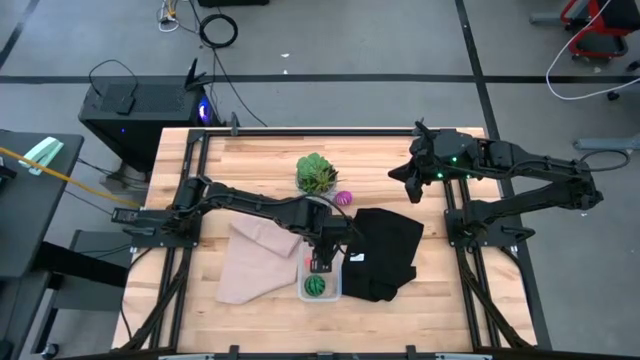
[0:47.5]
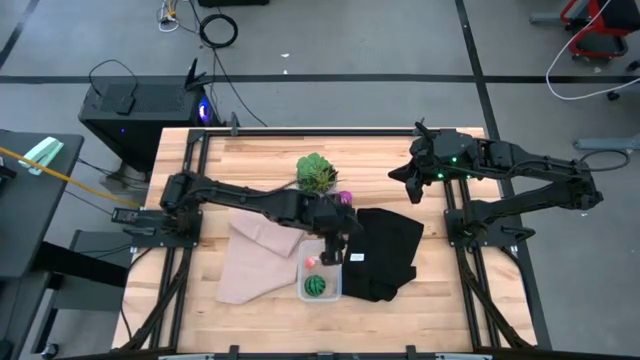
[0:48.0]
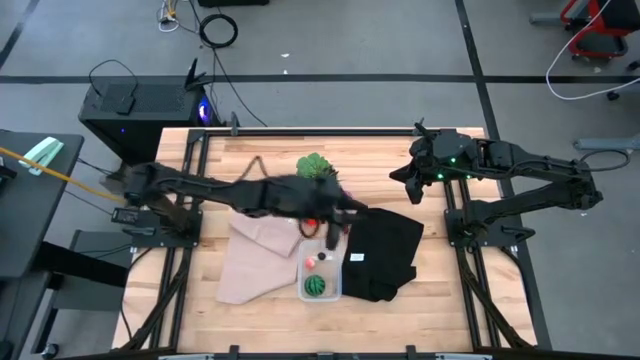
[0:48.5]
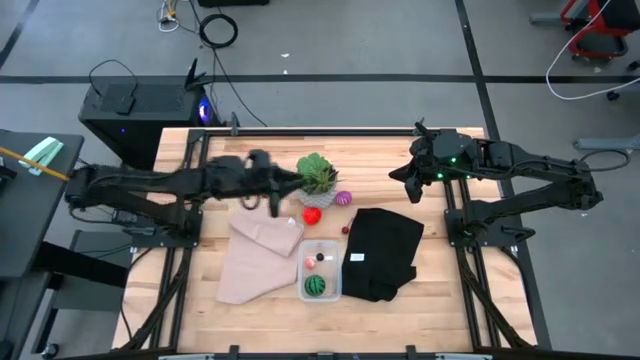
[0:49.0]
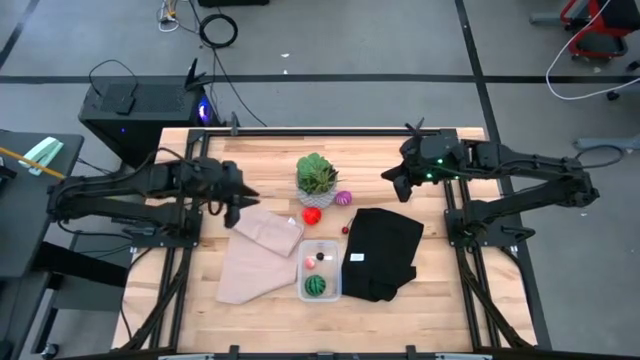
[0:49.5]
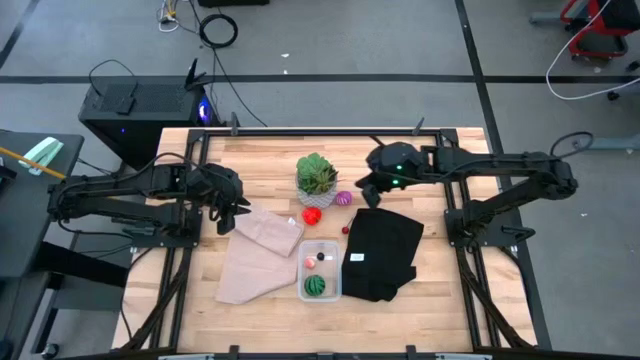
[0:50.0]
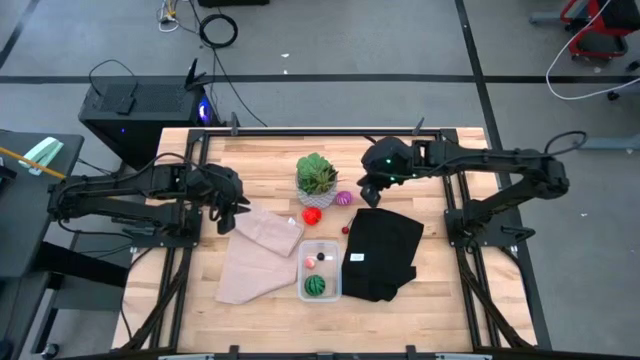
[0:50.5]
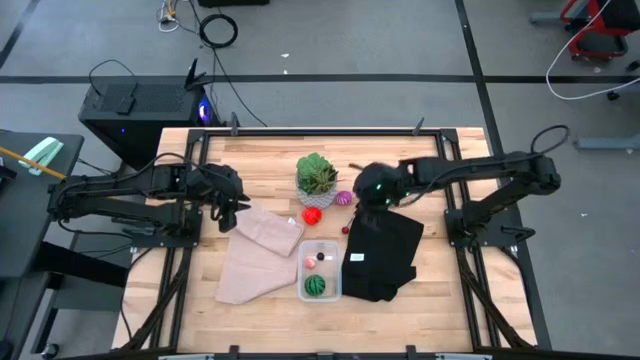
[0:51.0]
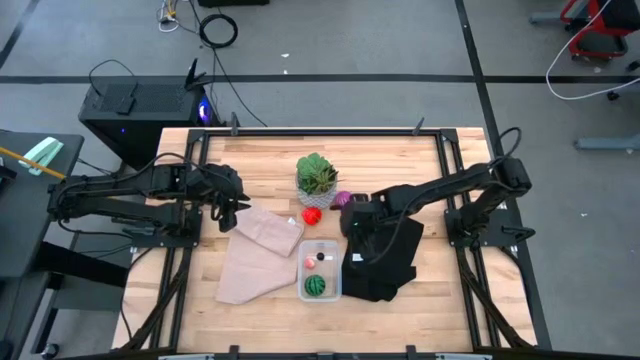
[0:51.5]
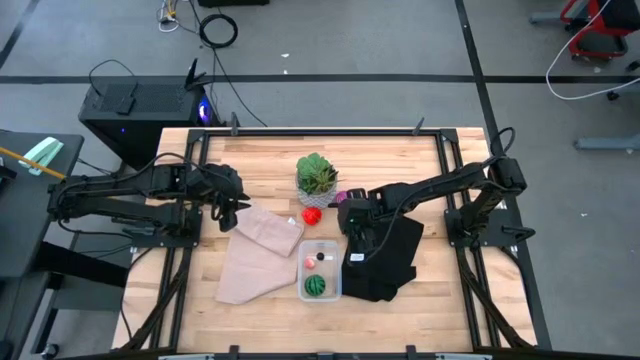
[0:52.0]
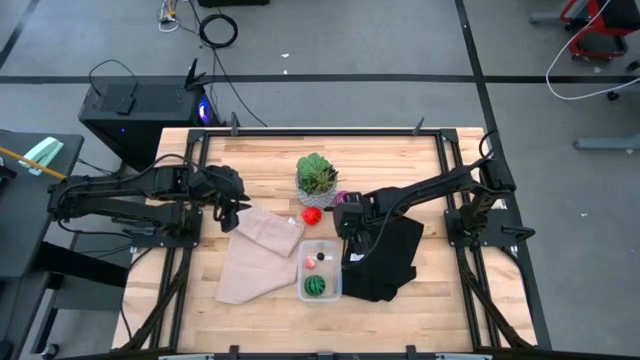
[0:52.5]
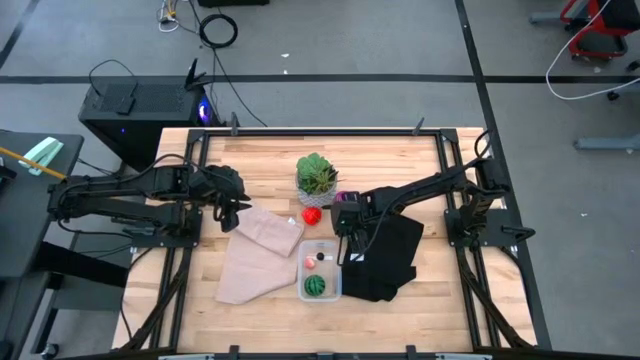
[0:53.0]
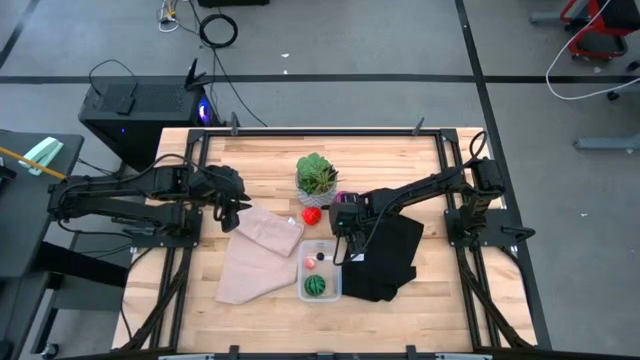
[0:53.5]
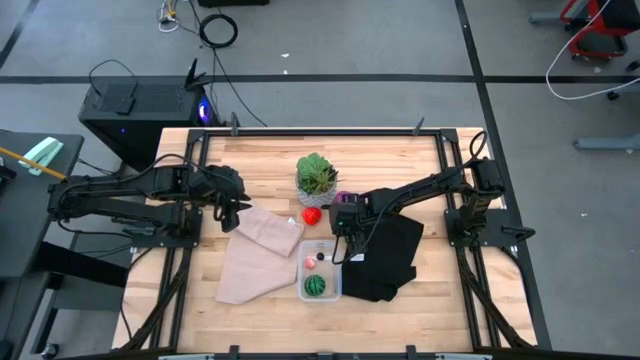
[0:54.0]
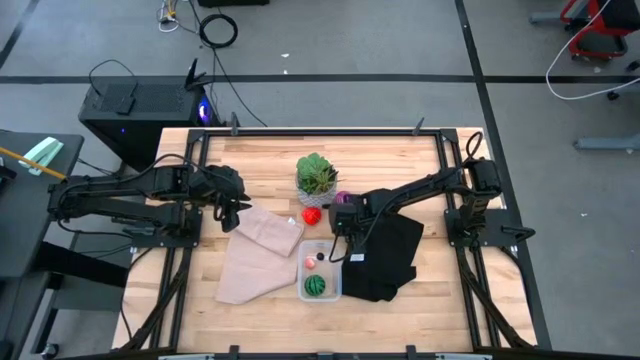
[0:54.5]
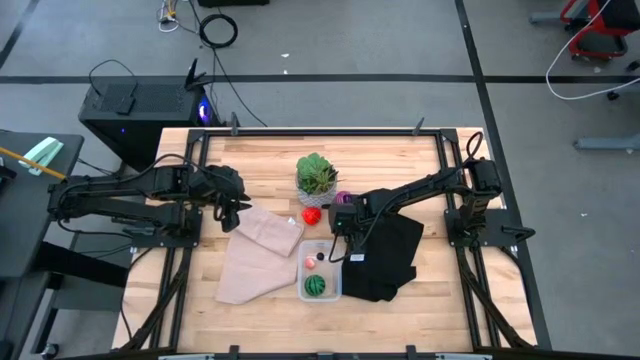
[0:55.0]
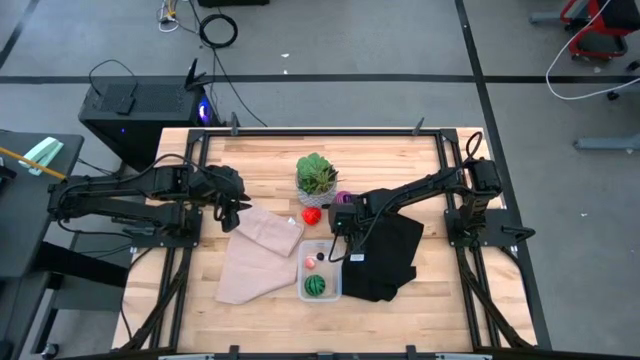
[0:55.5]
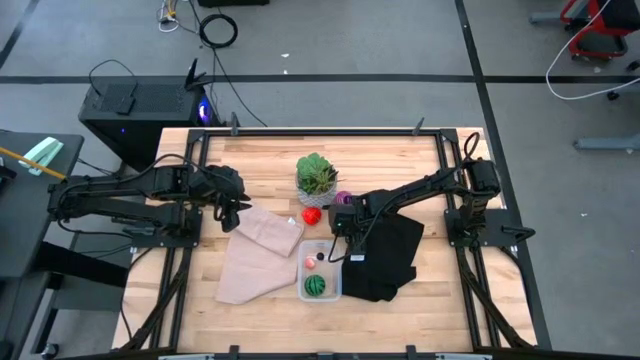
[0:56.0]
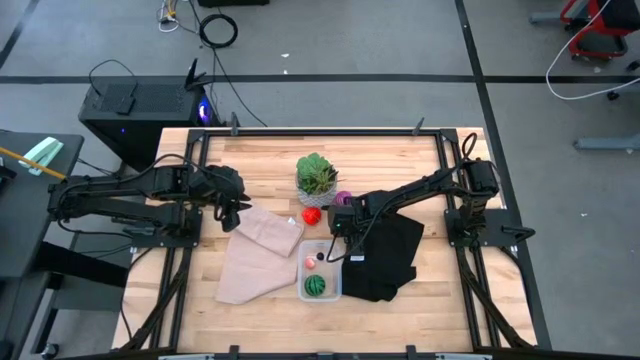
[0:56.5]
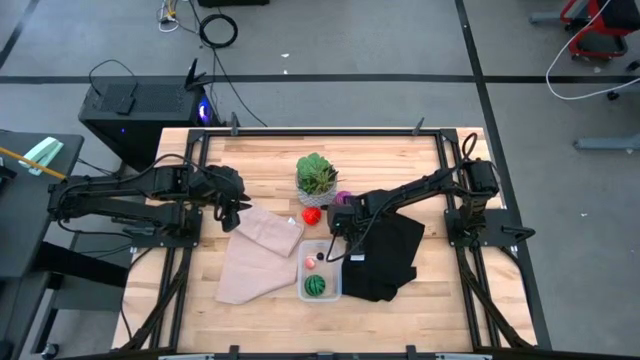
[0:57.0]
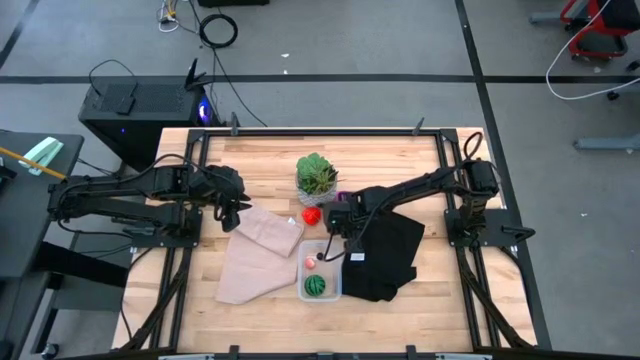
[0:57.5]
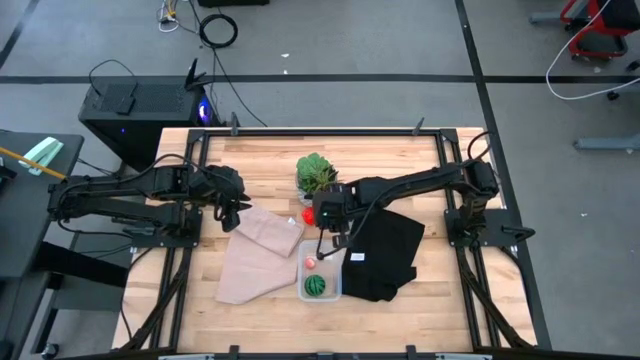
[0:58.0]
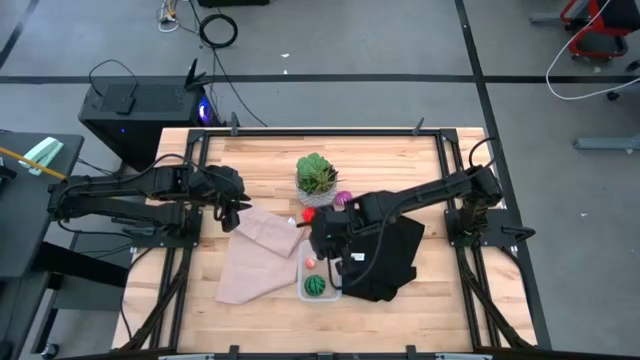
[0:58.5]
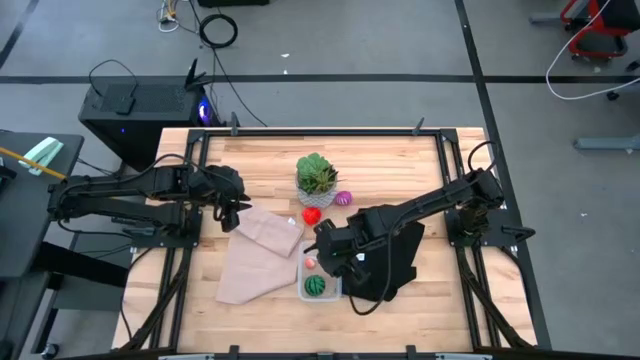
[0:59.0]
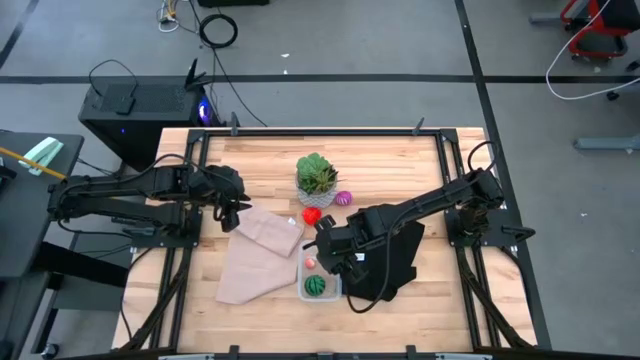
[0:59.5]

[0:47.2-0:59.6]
Task: Pick and placing Produce into tupperware
Put the red cherry into the transparent container

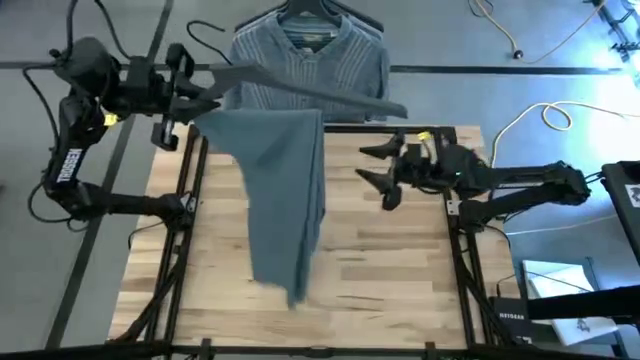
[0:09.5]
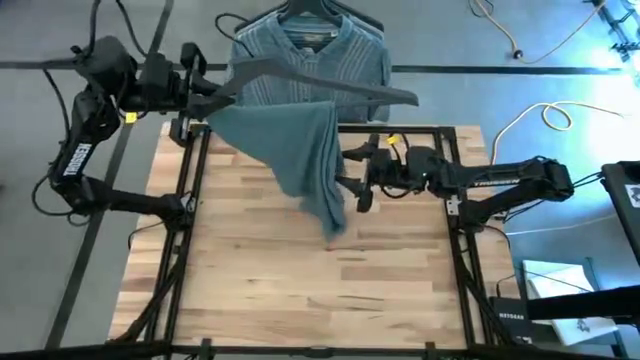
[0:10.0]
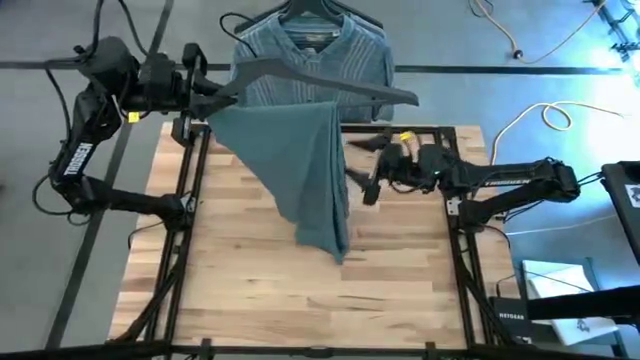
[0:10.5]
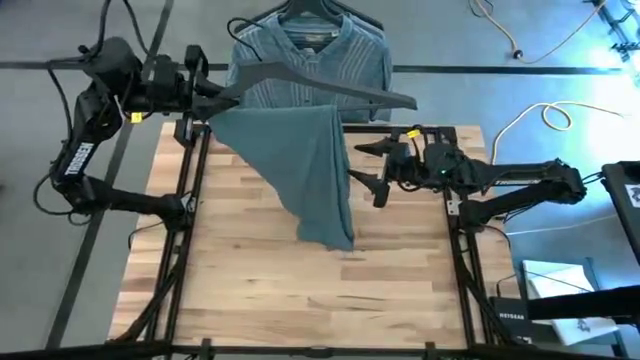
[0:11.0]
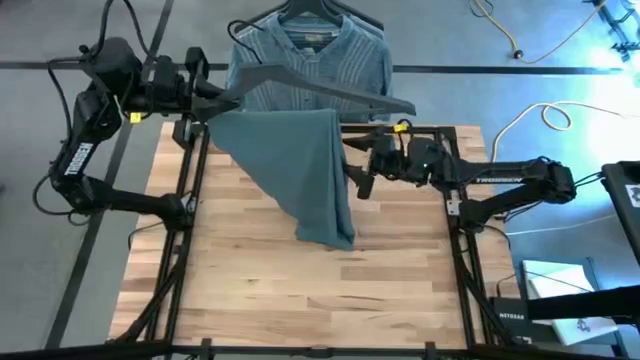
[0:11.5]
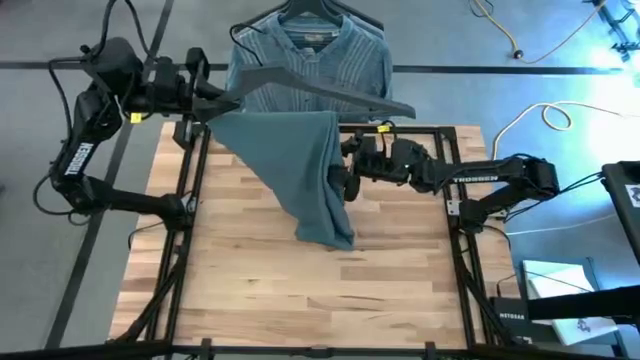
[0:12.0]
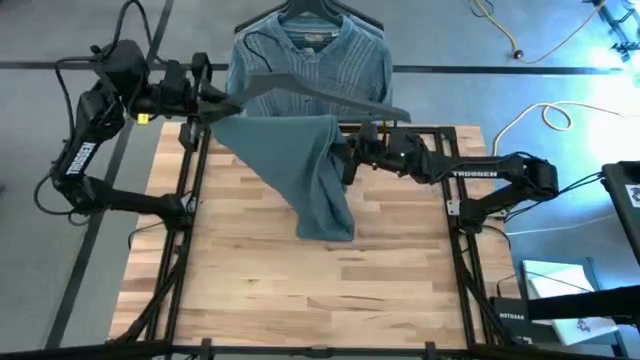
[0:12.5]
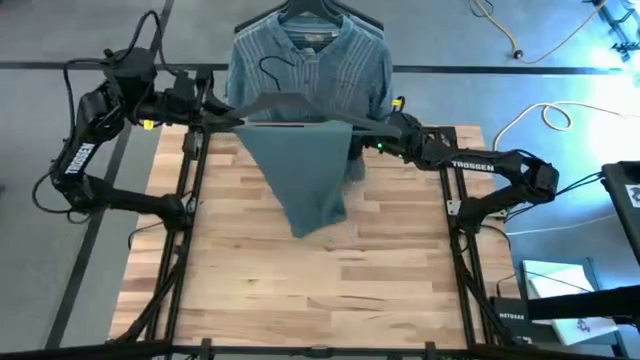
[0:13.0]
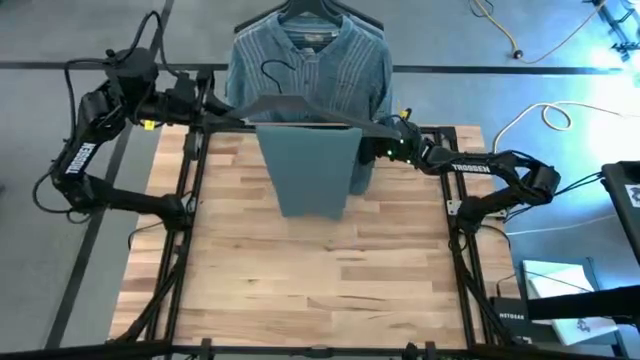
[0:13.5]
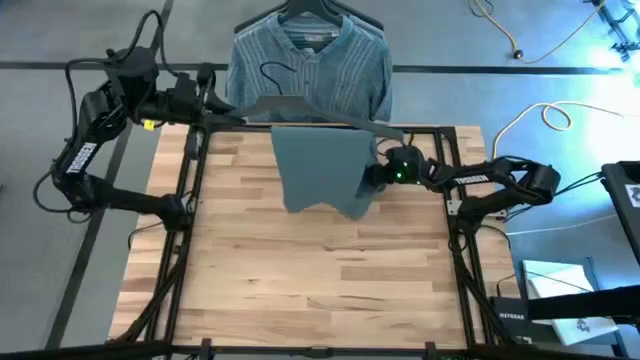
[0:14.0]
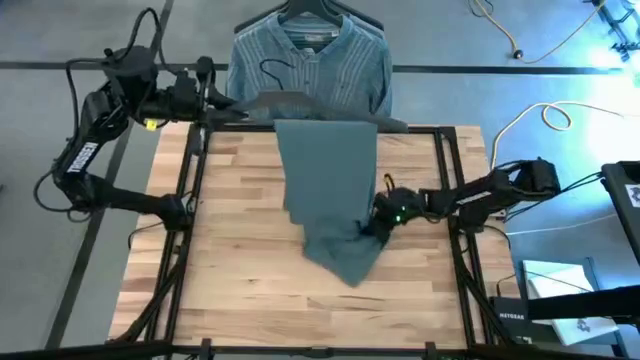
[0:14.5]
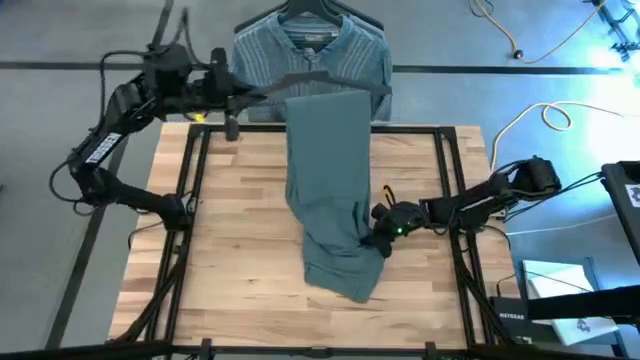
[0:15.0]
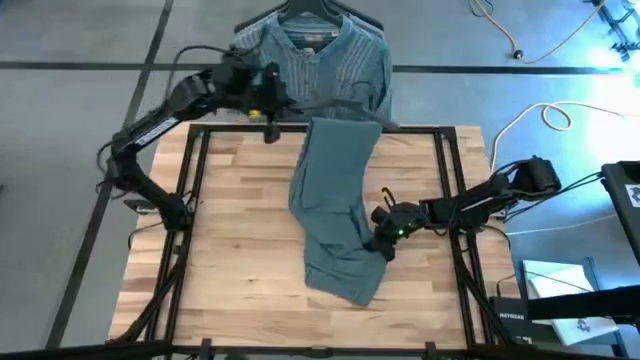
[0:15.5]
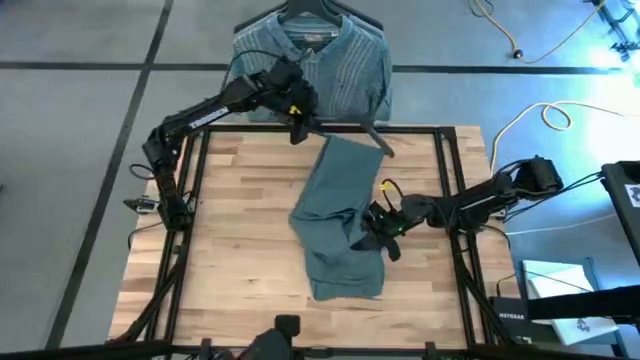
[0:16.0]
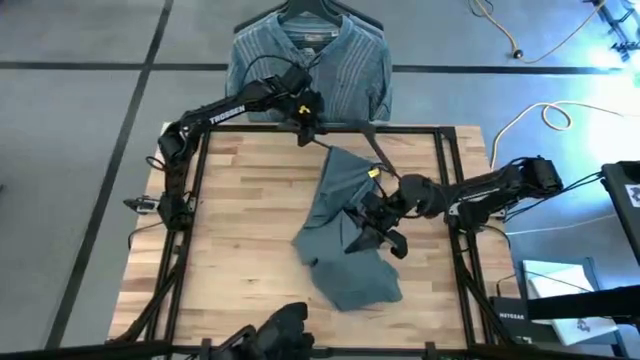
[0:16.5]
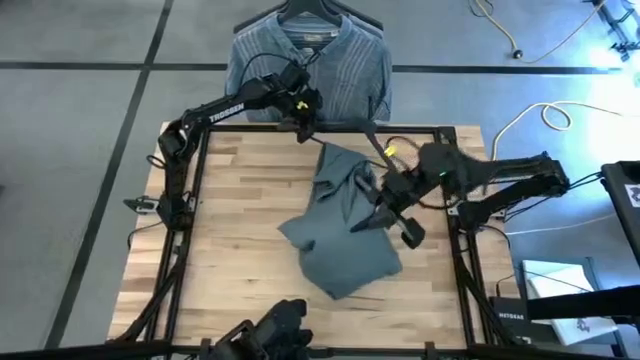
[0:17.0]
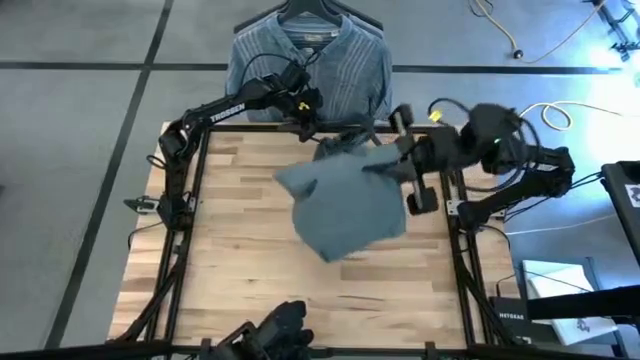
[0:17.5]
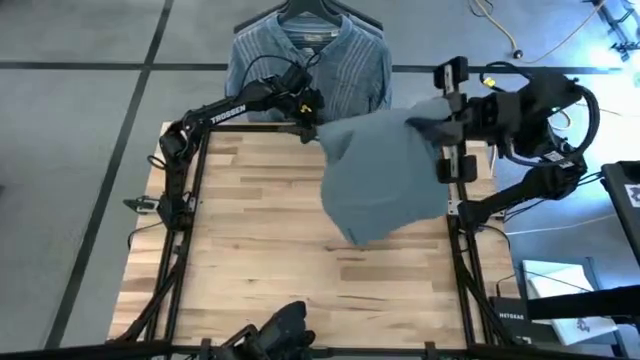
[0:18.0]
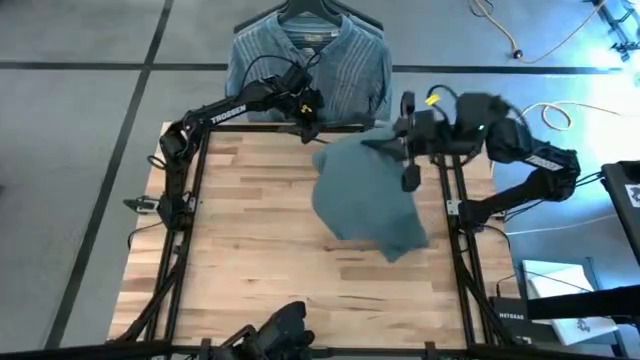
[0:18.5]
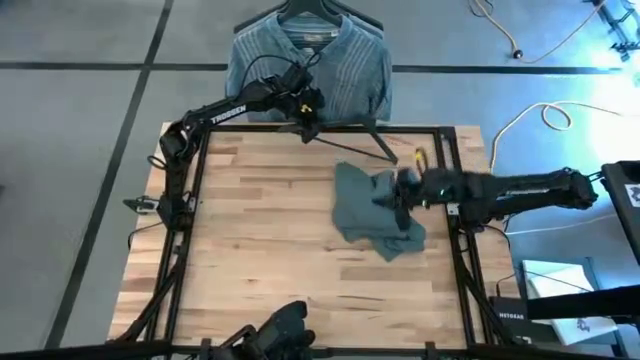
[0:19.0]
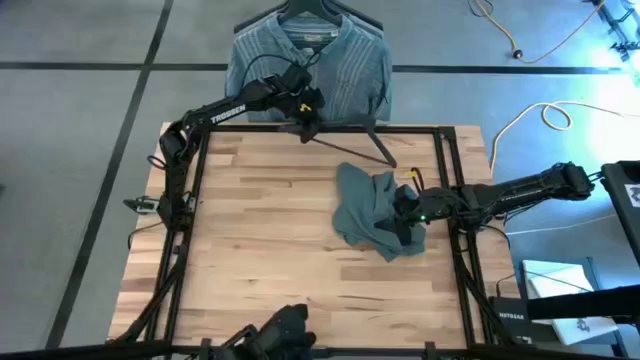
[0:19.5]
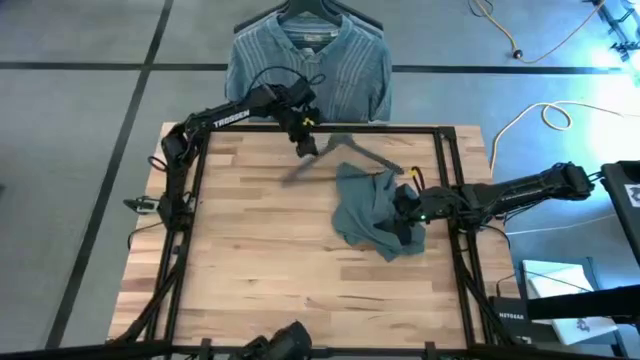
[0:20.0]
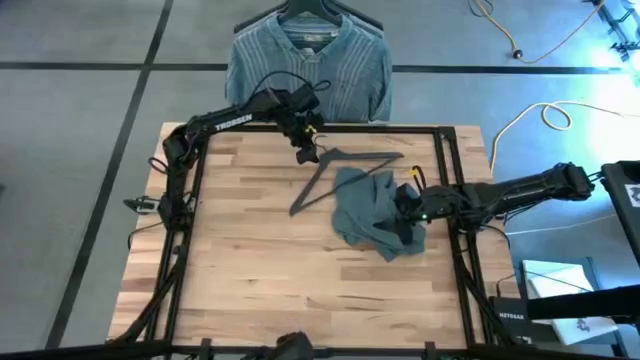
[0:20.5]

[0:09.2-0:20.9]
Task: Unhang clothes
Remove the jeans from the hanger
